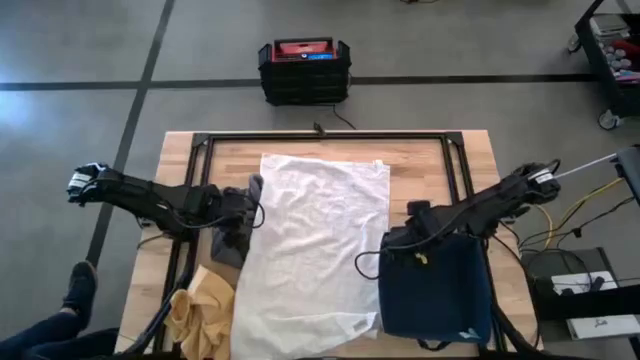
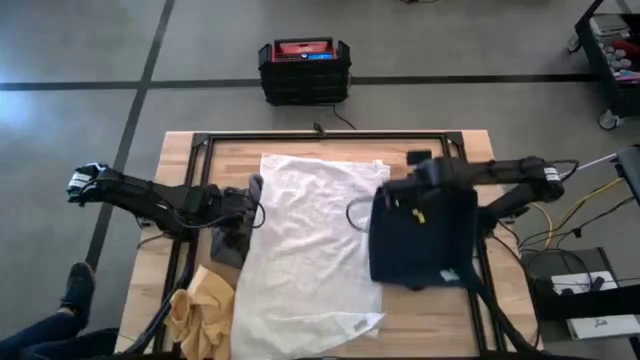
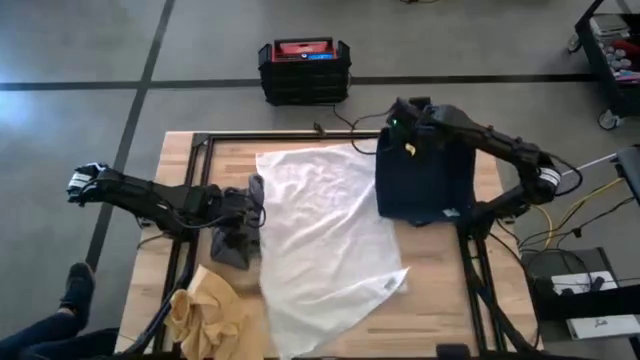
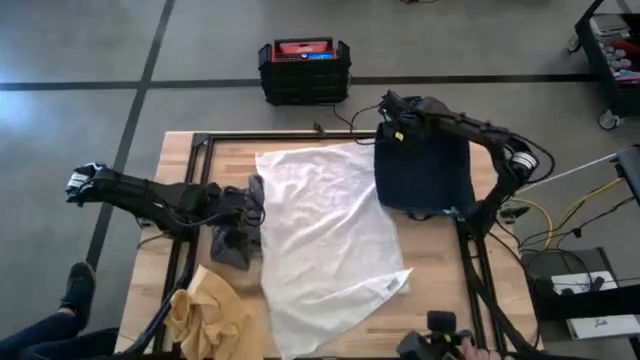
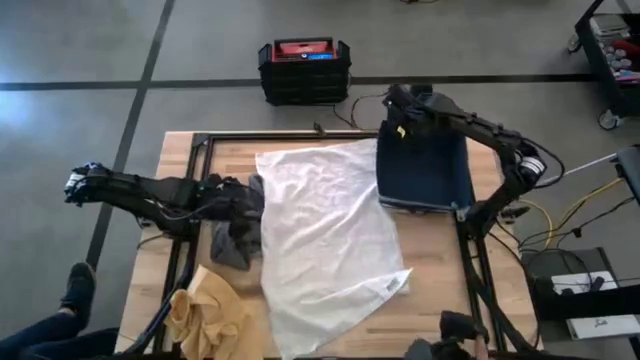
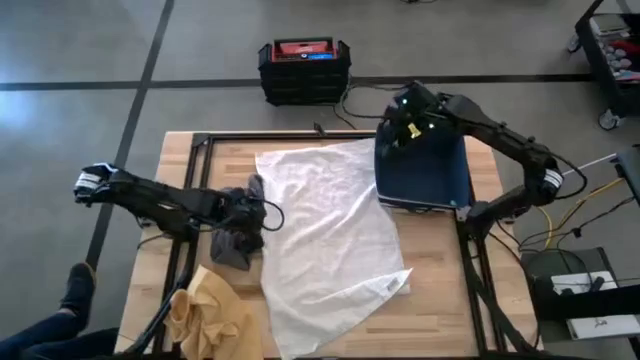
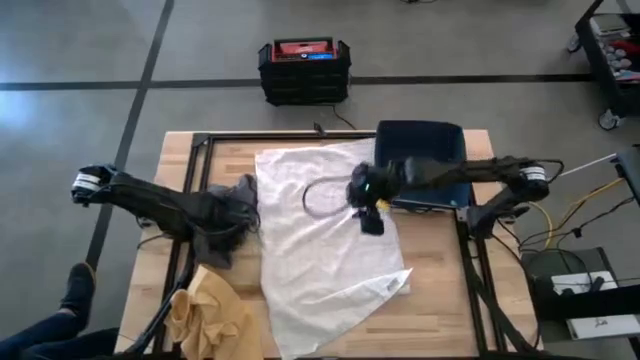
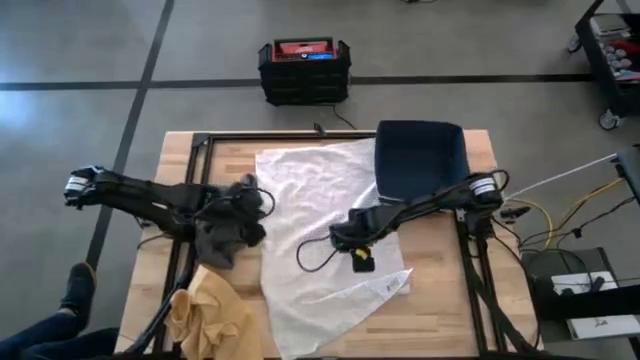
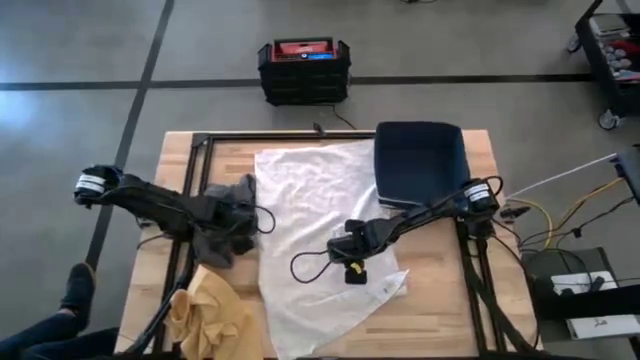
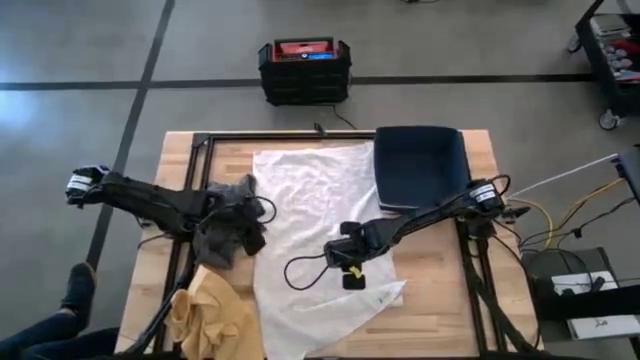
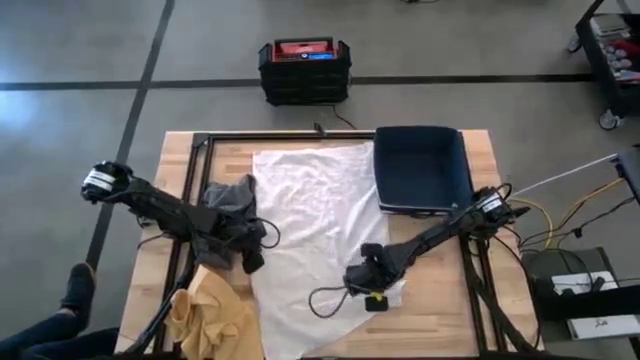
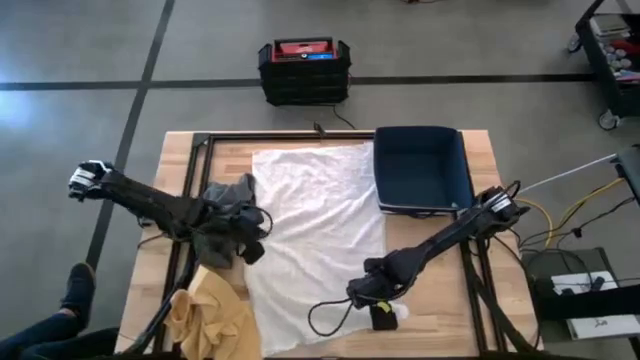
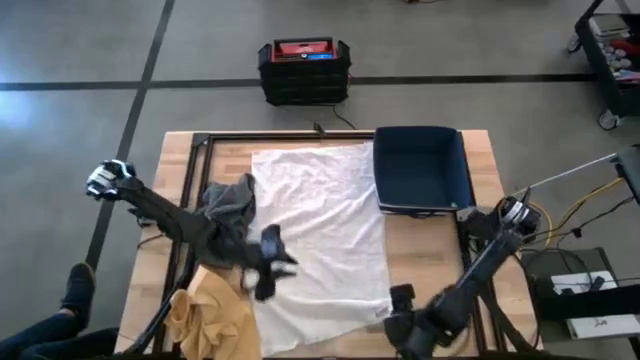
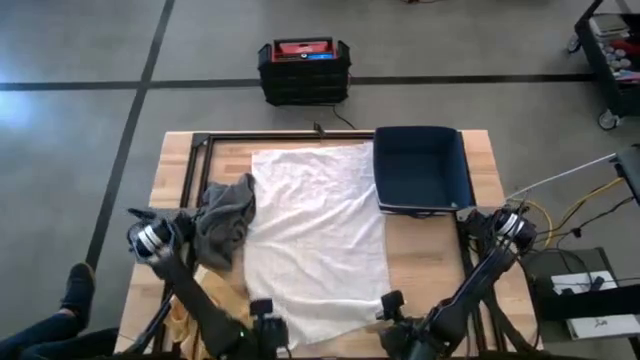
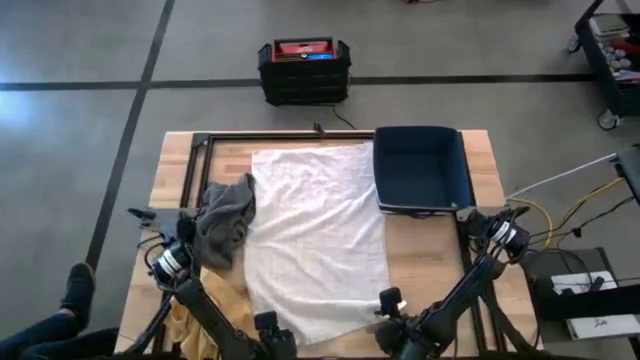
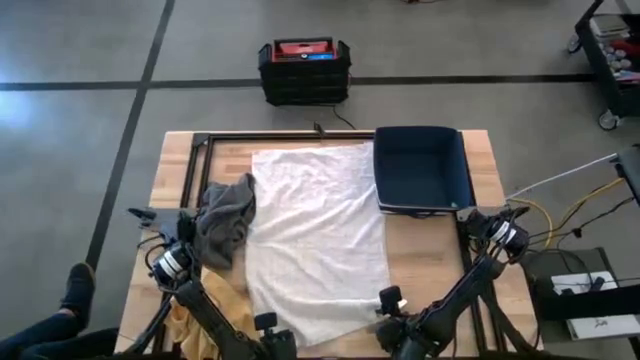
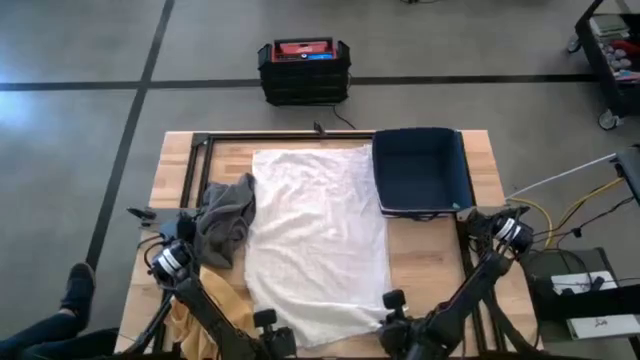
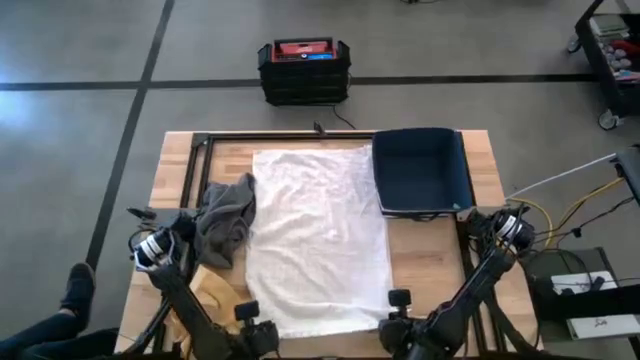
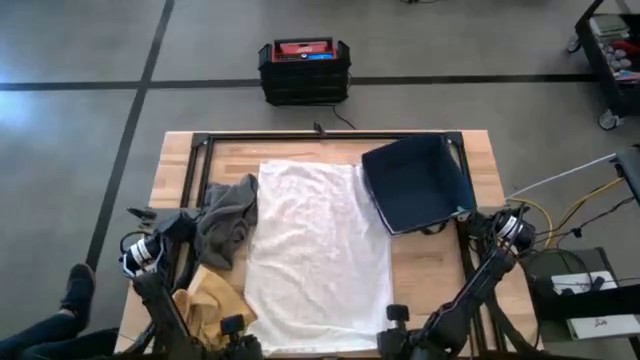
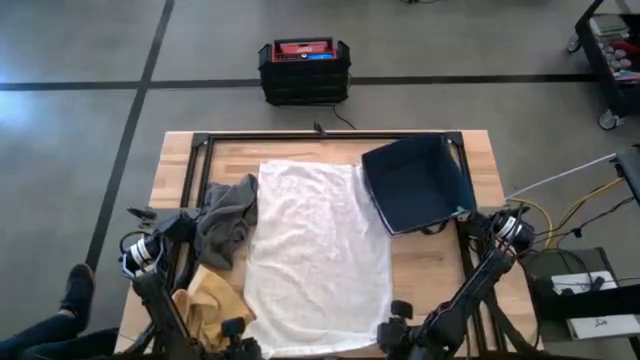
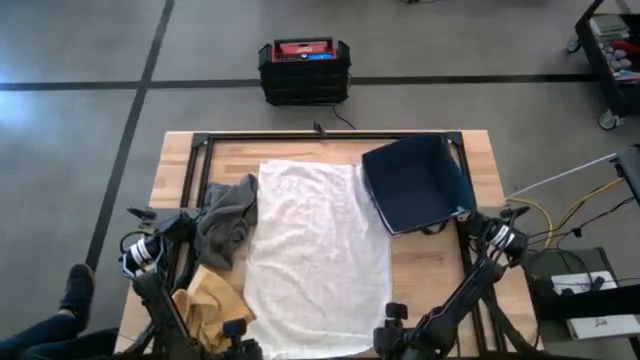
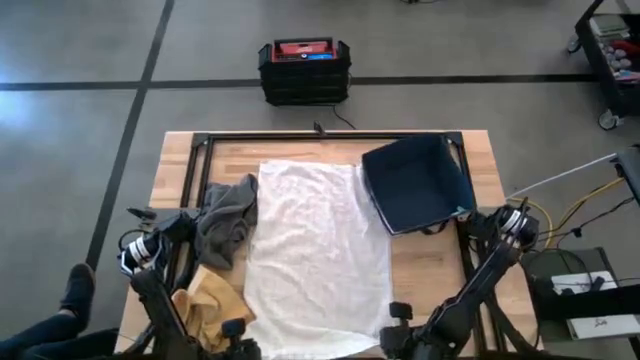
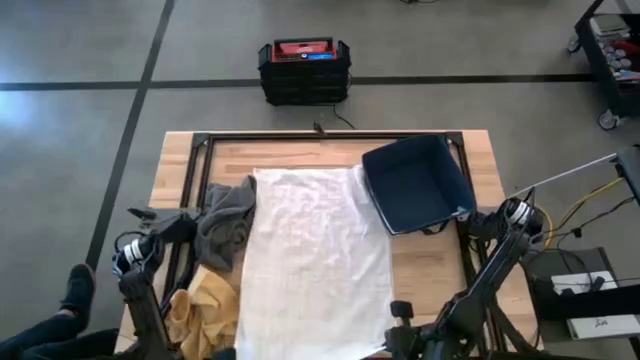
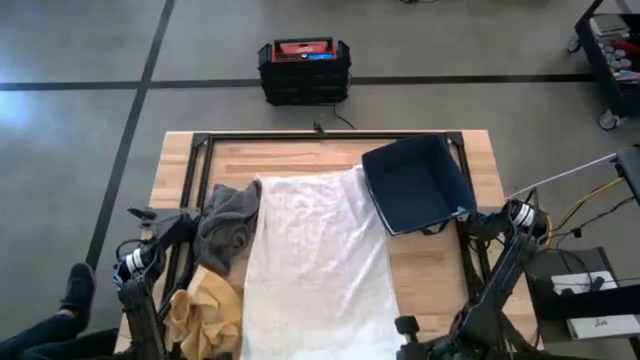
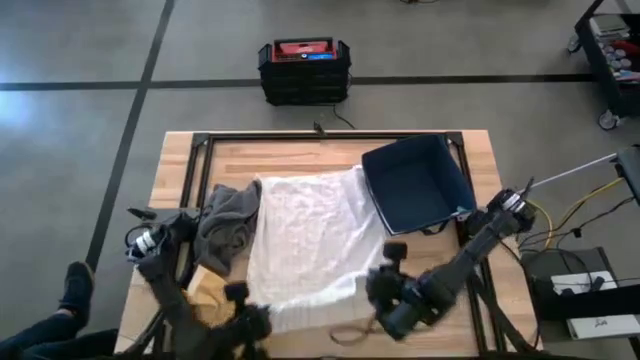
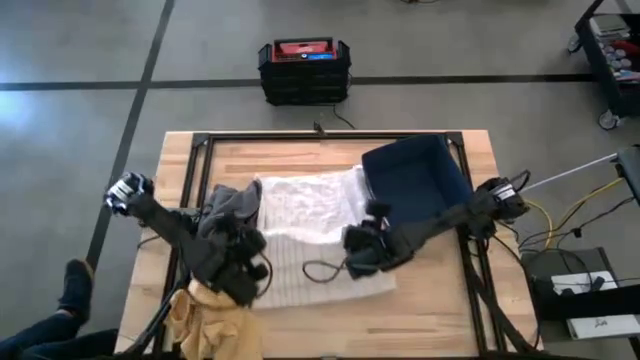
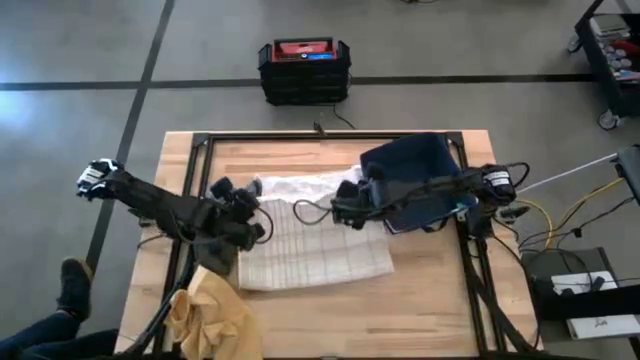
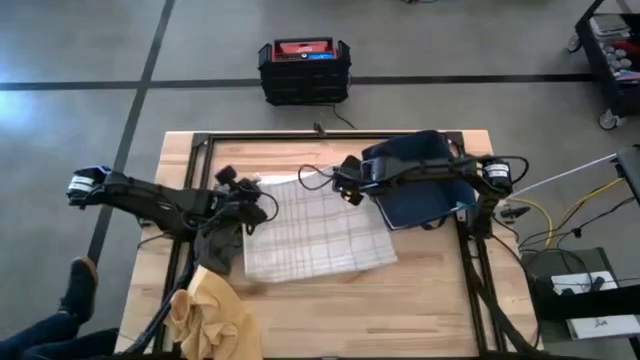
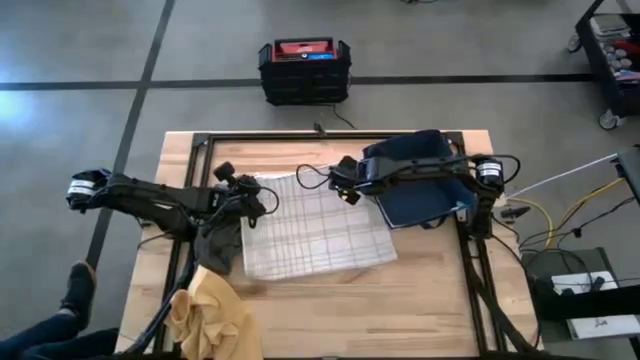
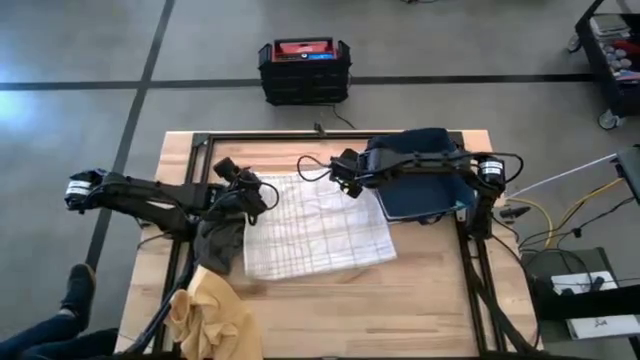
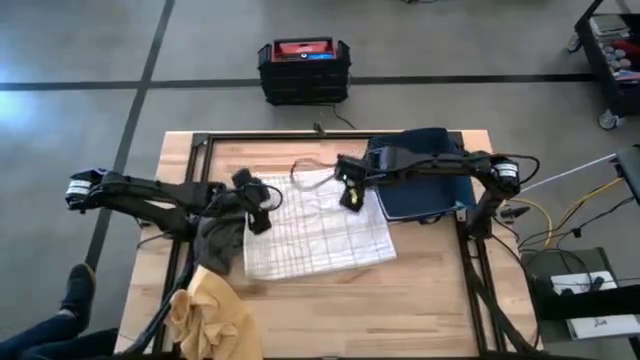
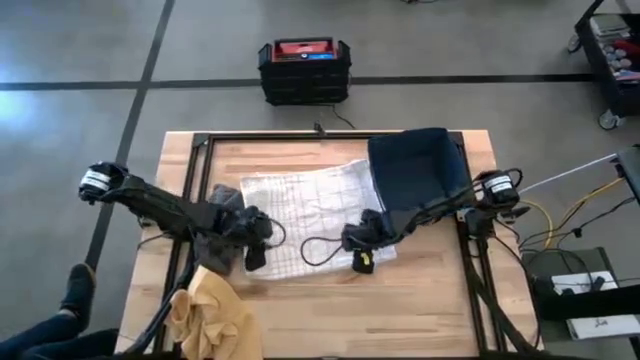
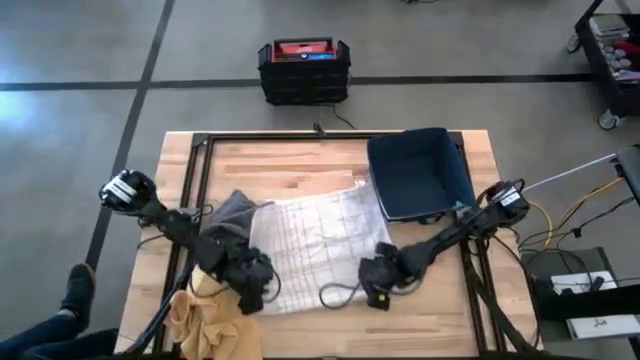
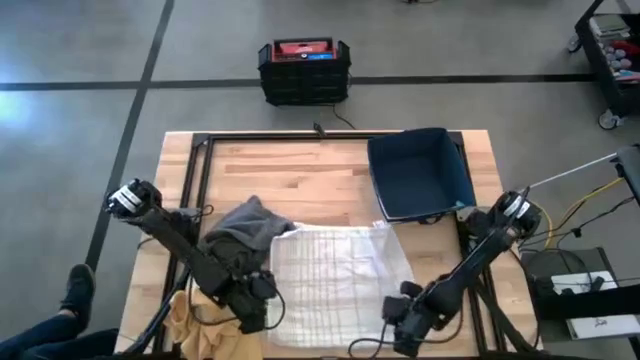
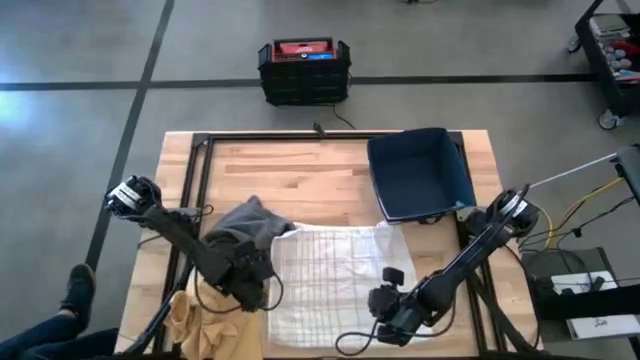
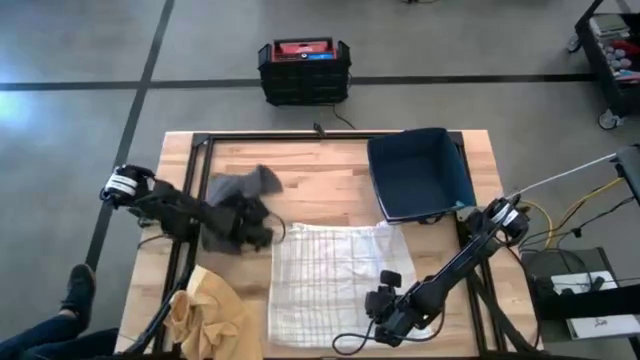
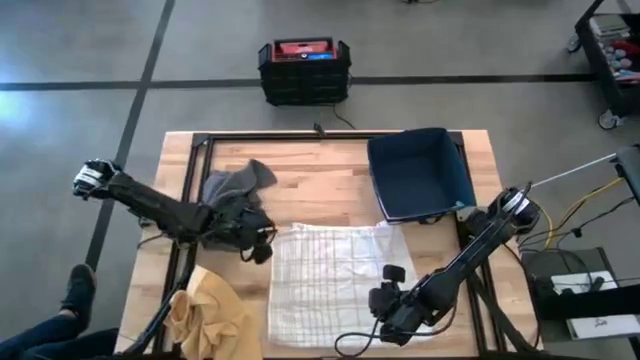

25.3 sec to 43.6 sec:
Task: Fold towel
Fold the white towel

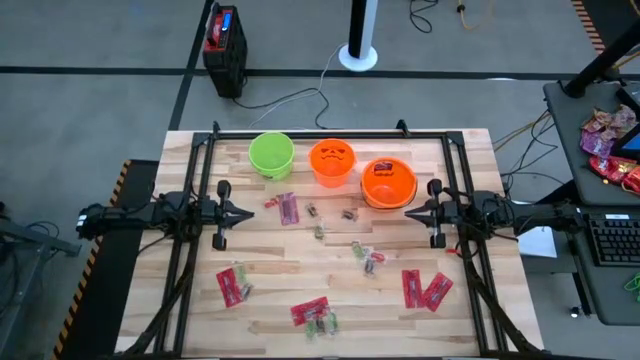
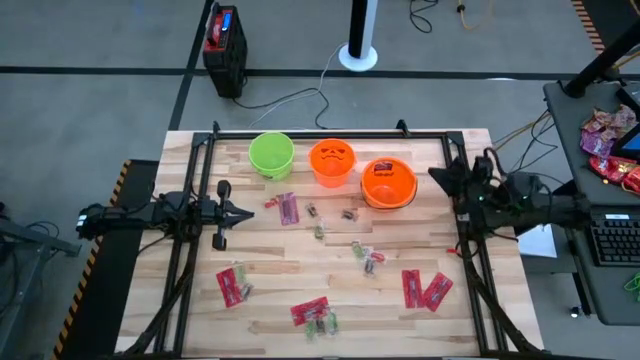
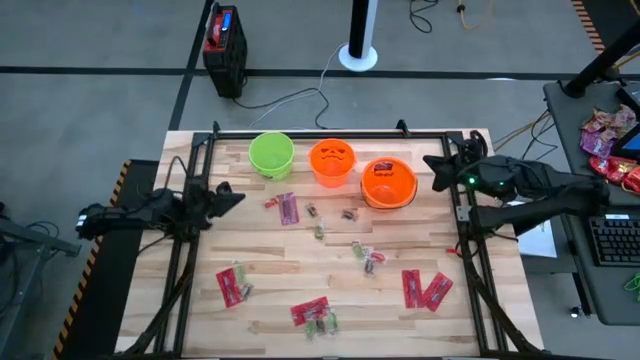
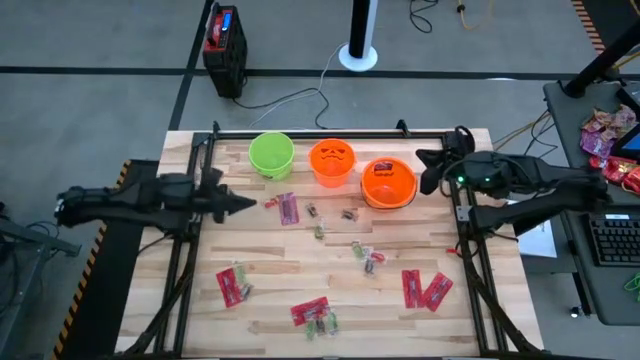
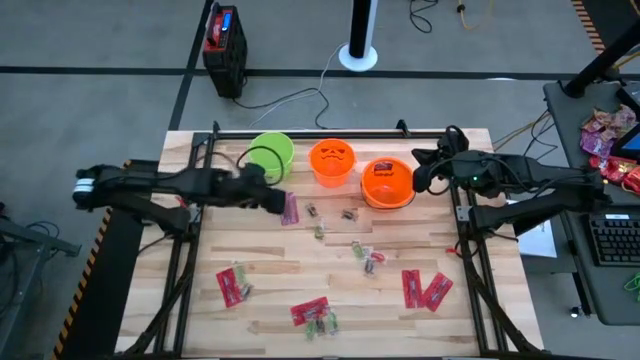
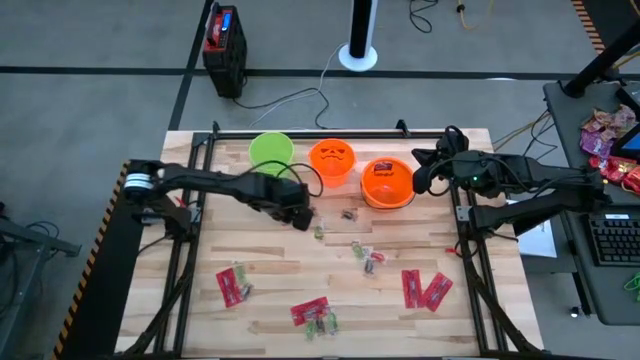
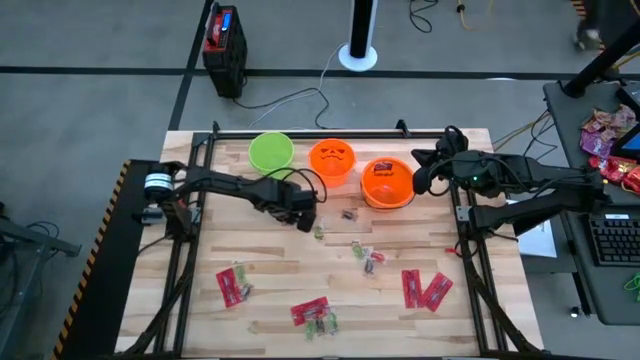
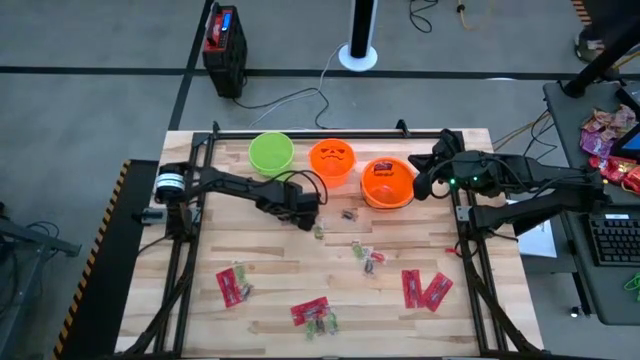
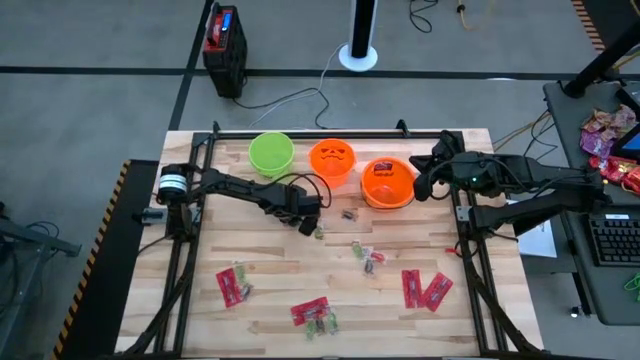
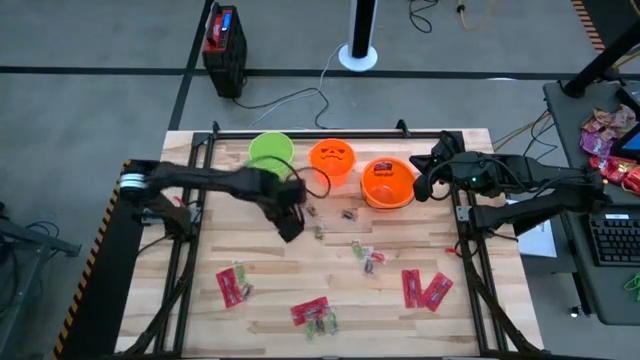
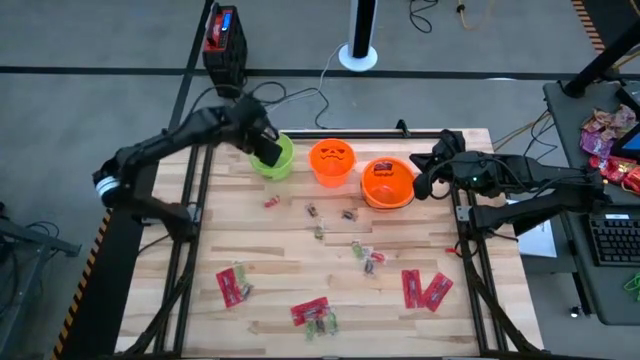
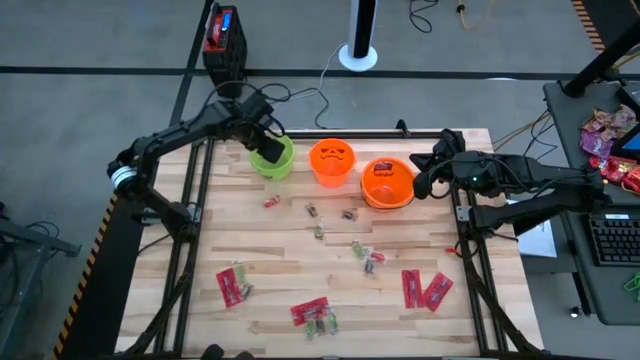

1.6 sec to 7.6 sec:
Task: Sort candy by brand, put in halloween buckets
Put the red candy into the green bucket
